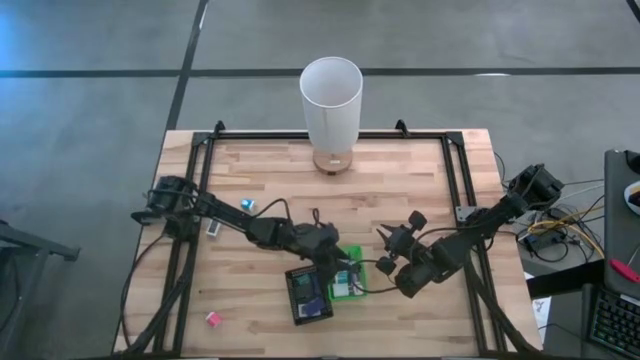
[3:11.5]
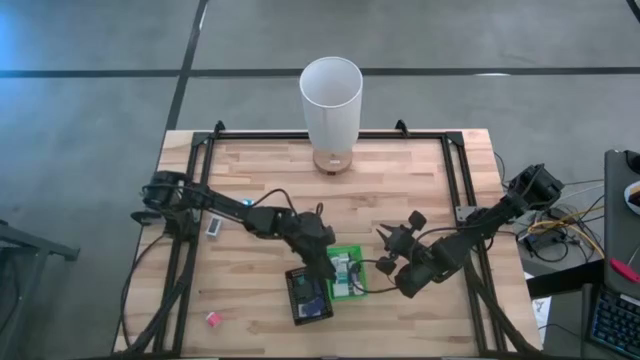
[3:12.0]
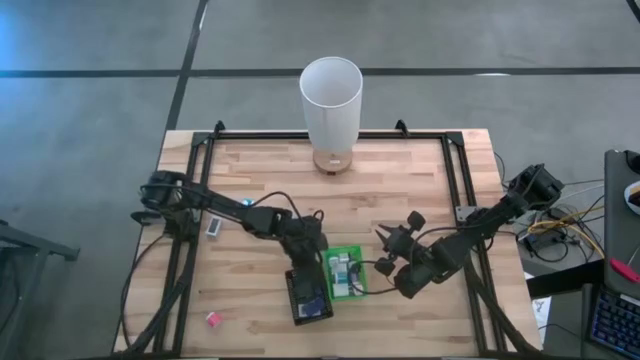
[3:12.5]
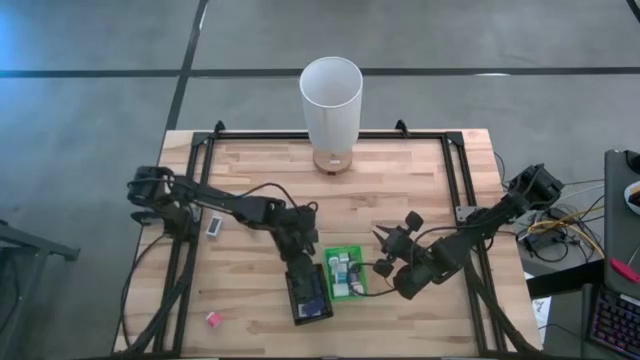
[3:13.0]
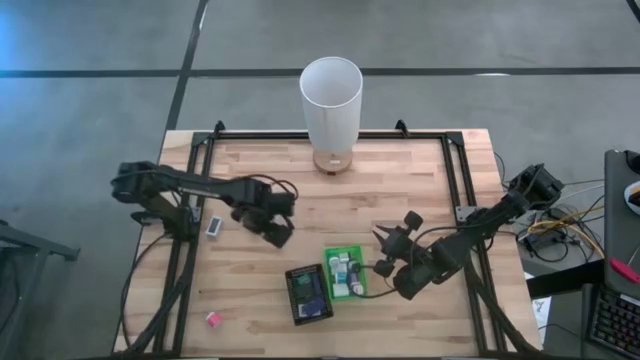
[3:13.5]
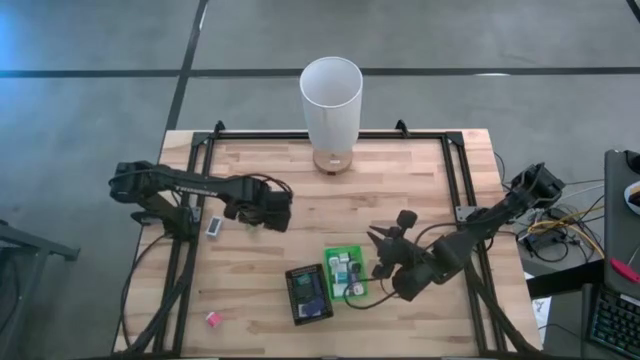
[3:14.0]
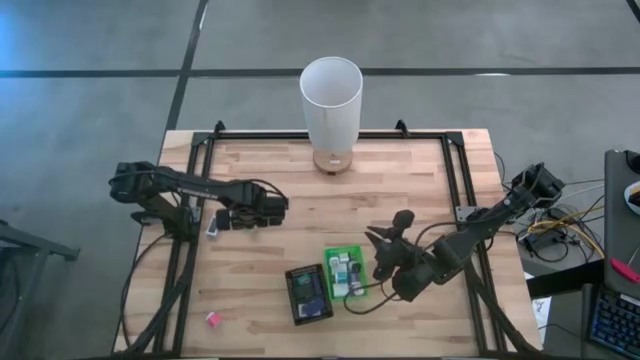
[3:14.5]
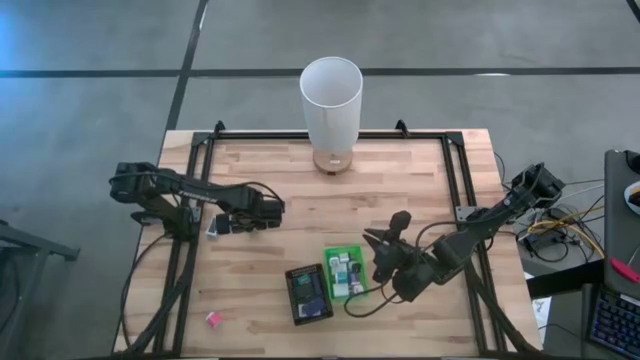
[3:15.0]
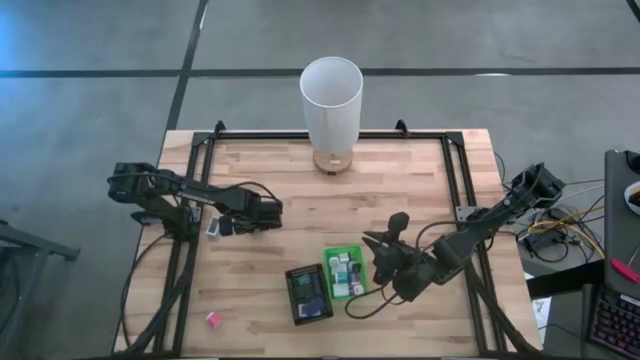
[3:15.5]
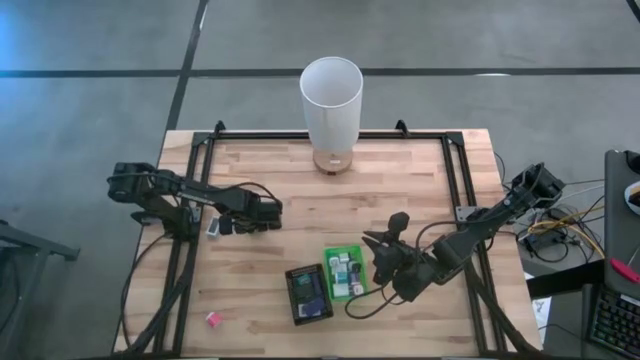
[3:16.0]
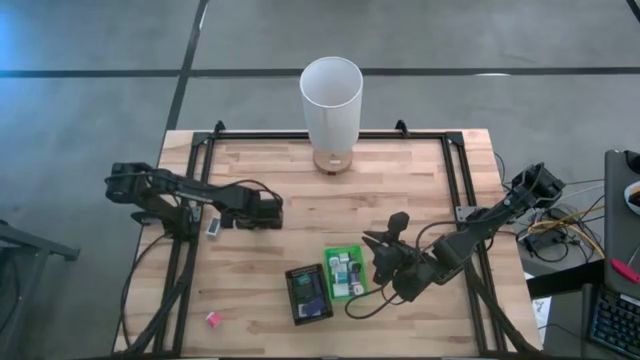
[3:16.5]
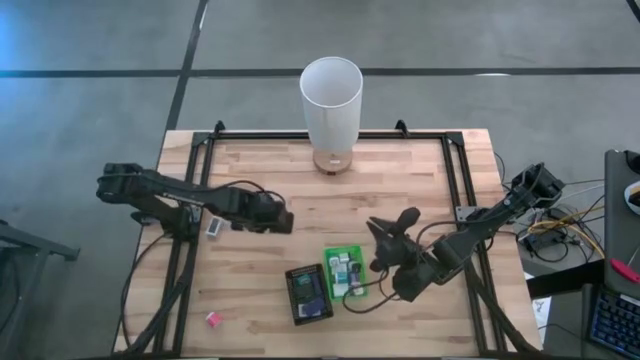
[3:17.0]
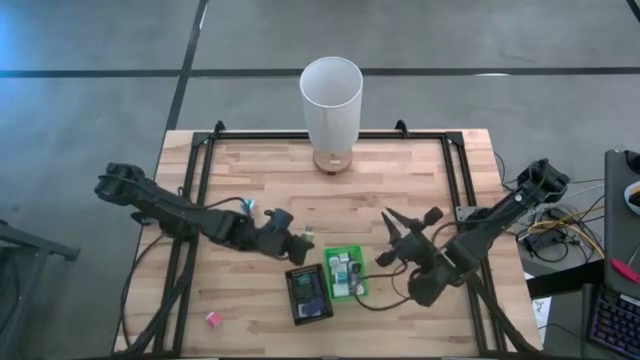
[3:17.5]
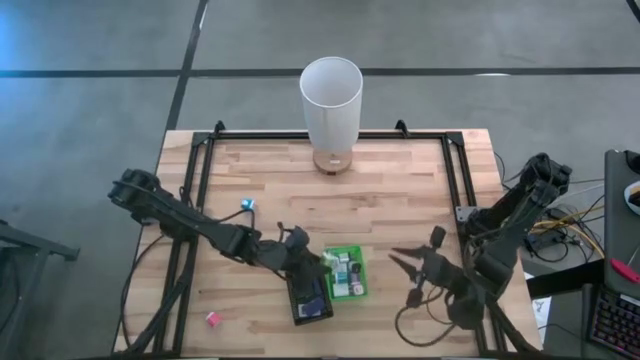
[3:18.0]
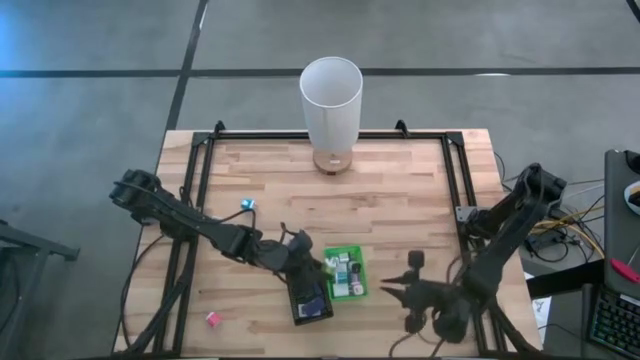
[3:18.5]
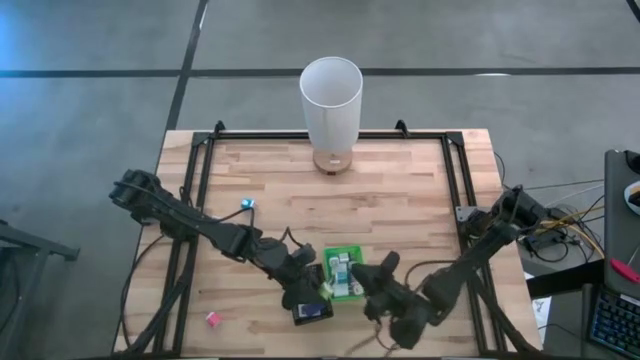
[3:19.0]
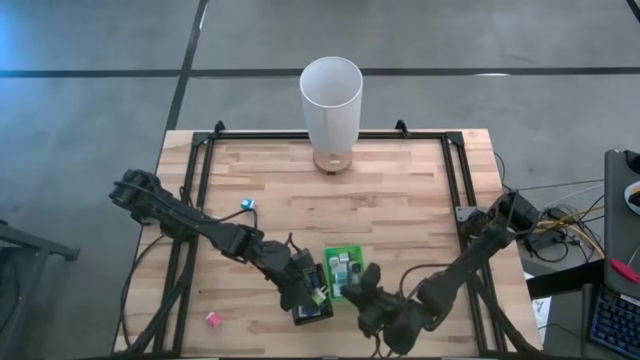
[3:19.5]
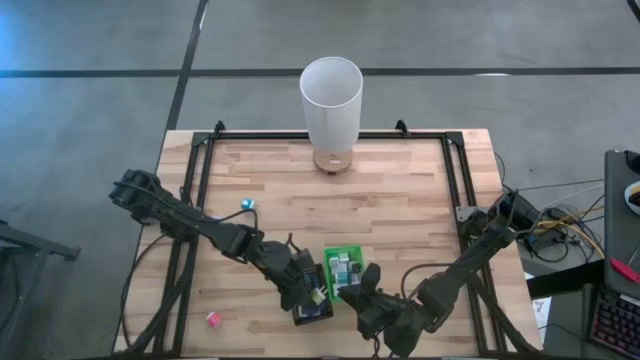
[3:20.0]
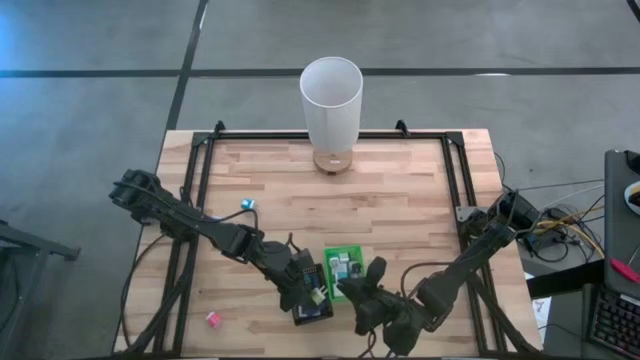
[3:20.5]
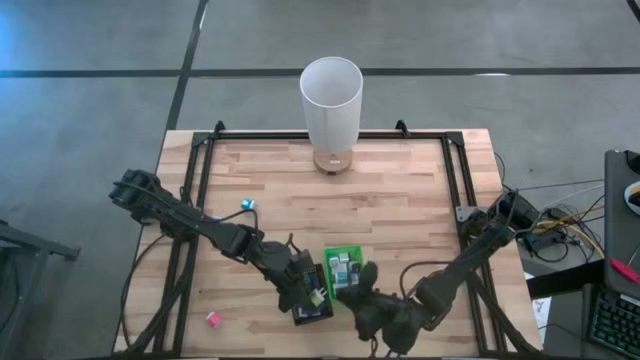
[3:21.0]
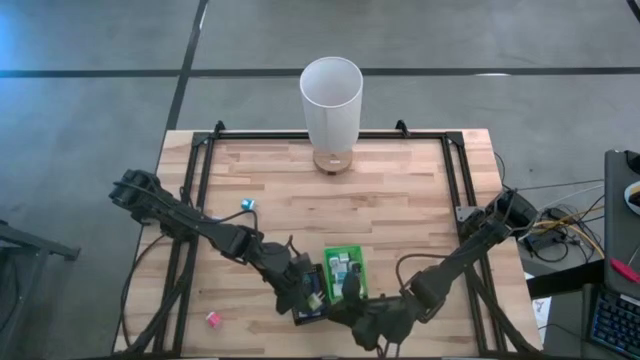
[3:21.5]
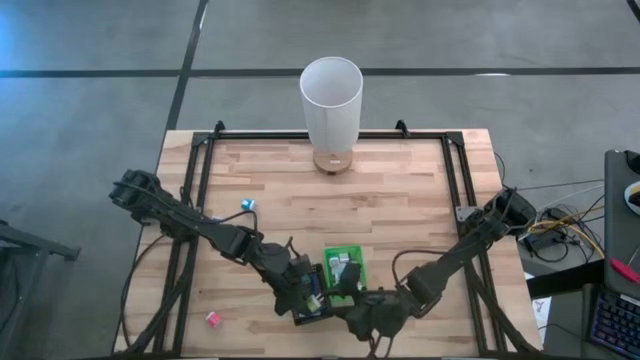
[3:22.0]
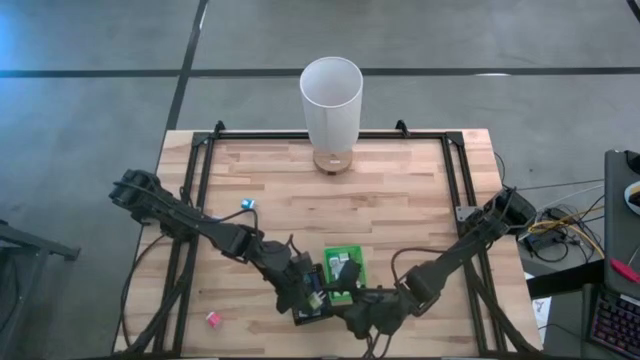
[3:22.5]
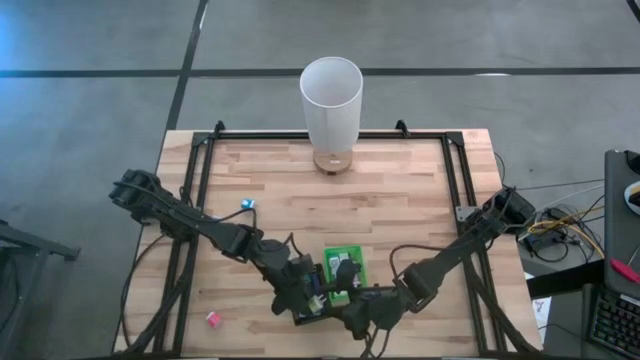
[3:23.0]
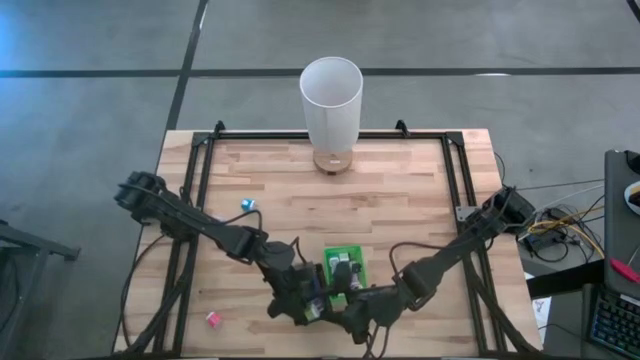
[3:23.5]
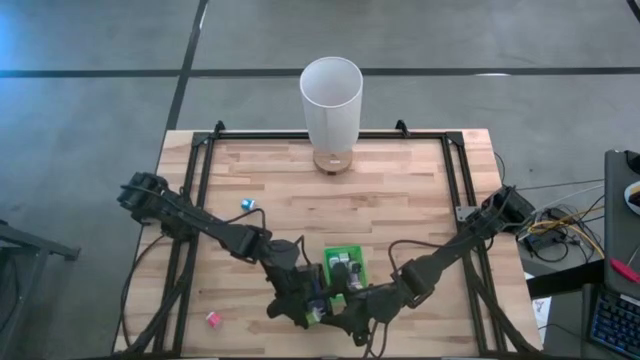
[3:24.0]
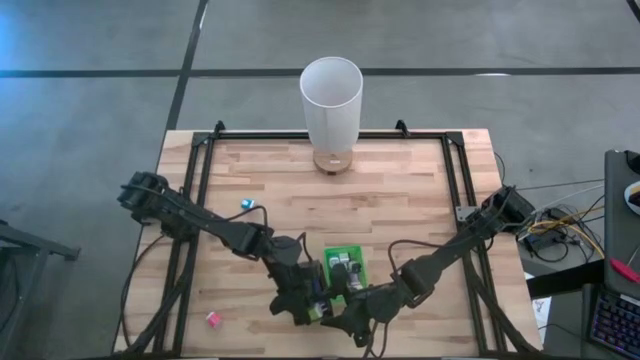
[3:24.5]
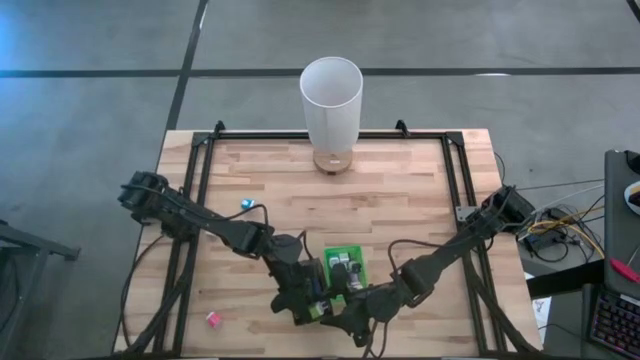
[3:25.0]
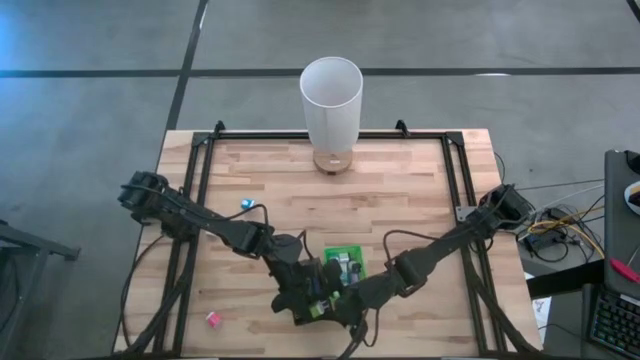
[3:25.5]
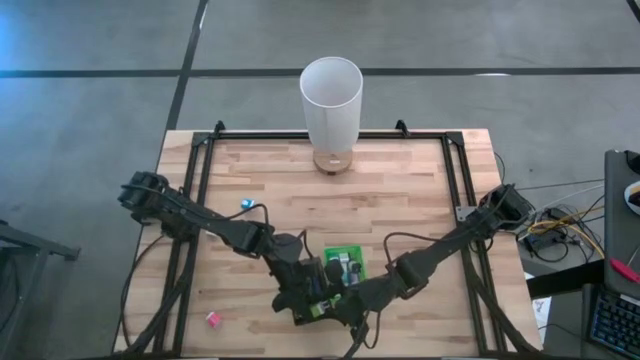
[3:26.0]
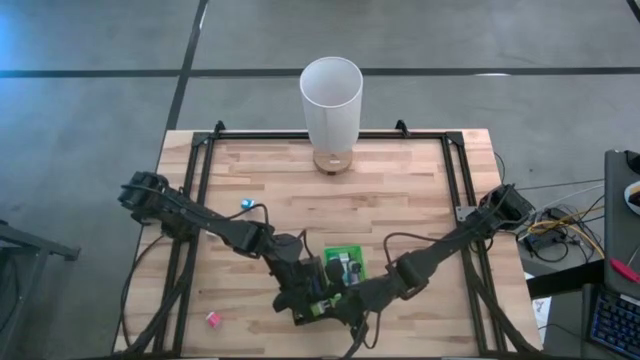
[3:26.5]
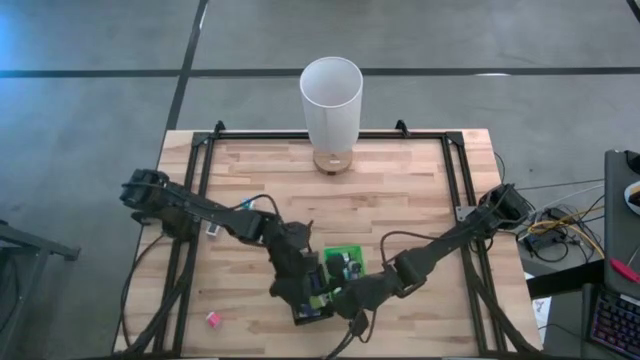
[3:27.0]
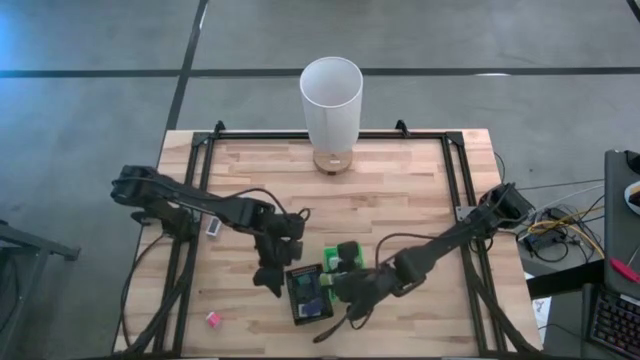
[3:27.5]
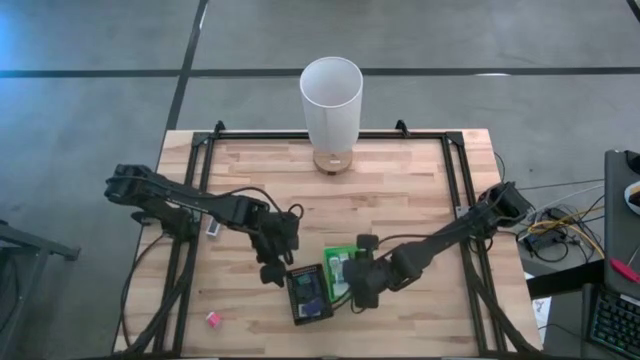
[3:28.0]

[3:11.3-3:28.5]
Task: Pick & Place Office items
Put the green charger adapter into the green bin

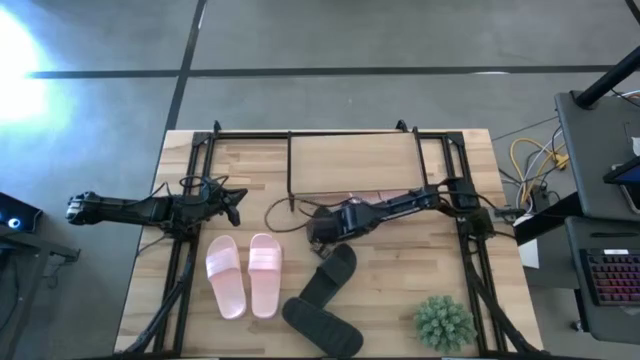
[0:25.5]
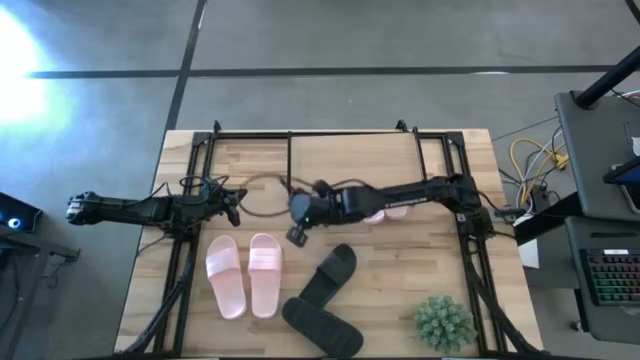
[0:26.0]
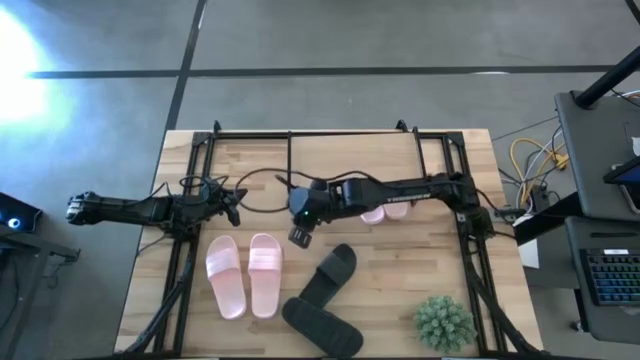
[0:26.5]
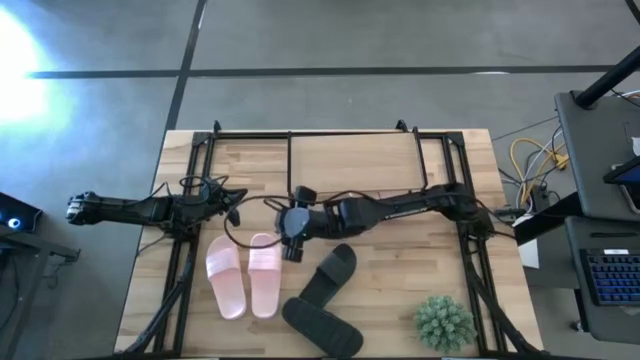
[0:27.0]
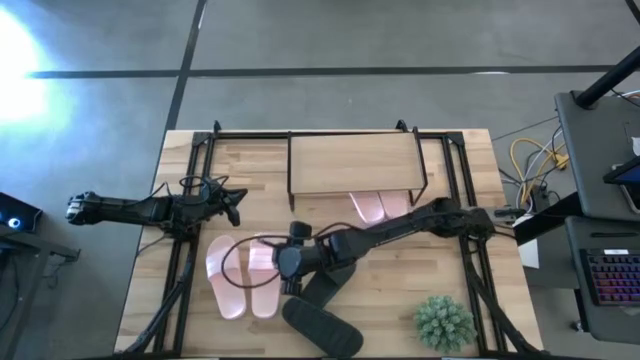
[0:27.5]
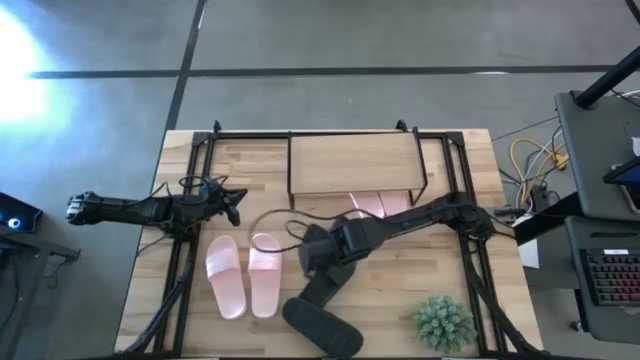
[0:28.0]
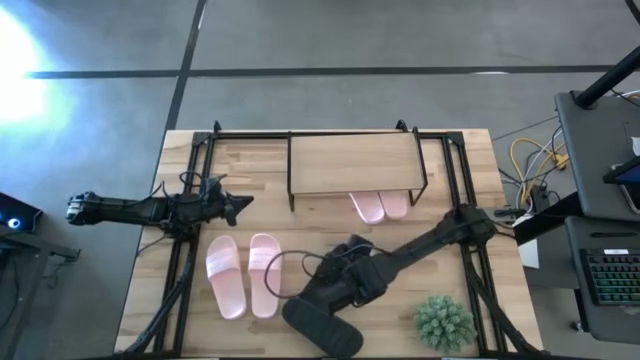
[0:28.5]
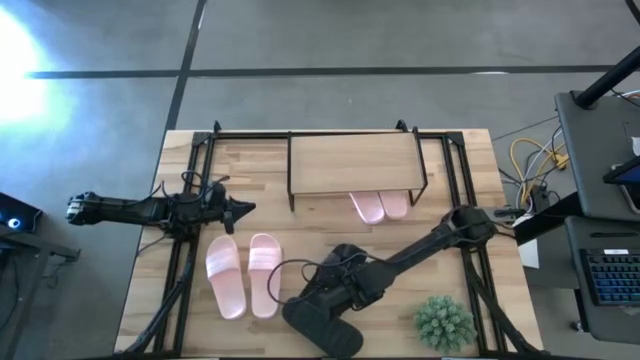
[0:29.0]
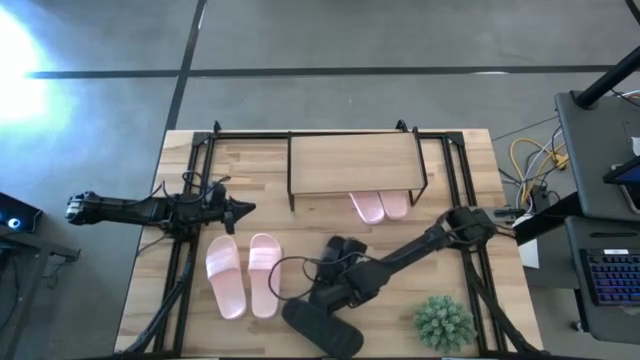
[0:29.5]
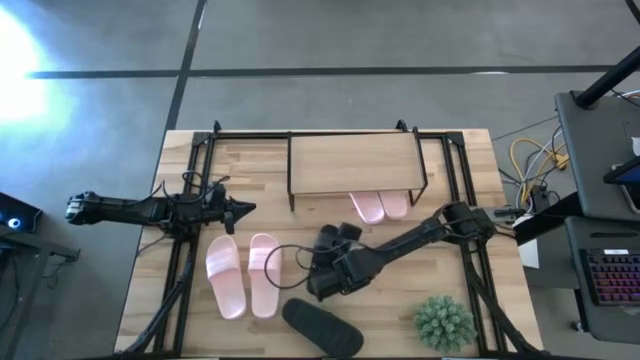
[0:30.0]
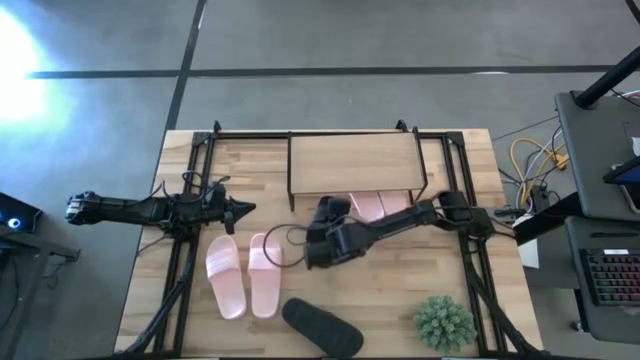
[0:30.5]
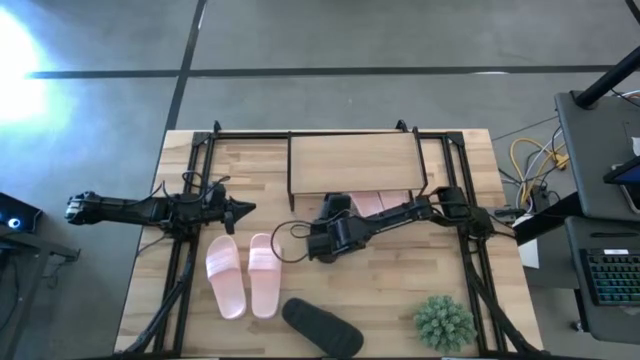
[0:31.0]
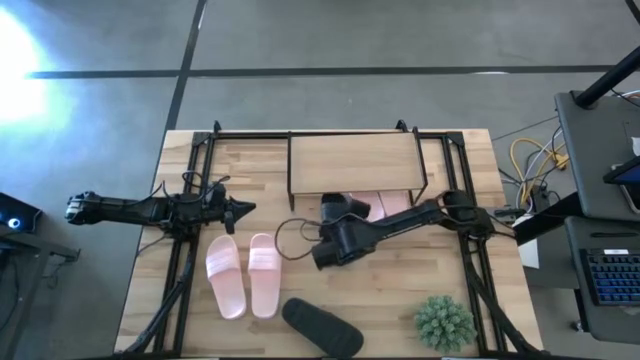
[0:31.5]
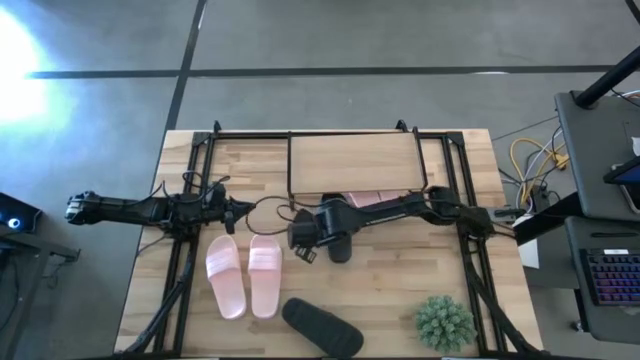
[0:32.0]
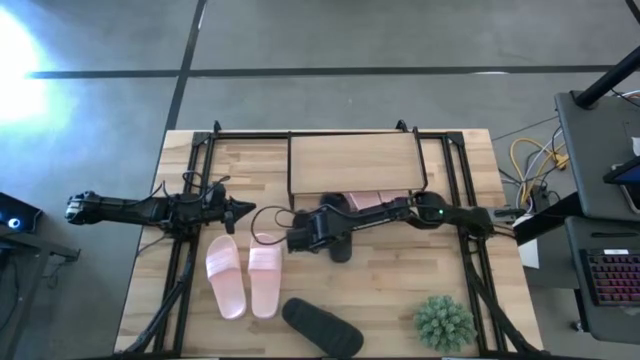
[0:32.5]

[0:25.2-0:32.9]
Task: Pick and place slides into the shelf
Put the black slide under the shelf
